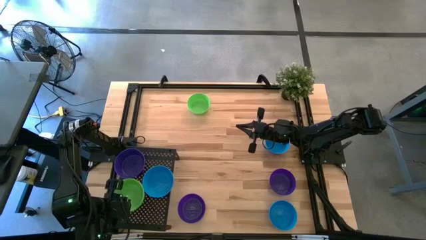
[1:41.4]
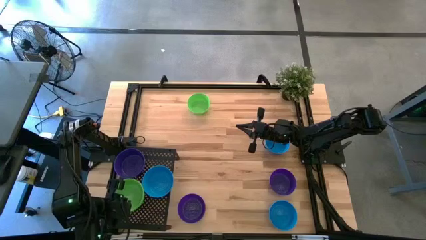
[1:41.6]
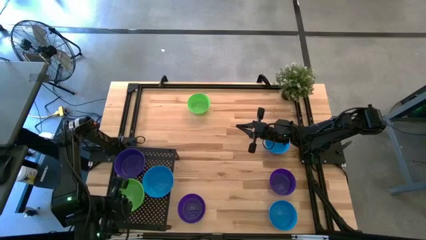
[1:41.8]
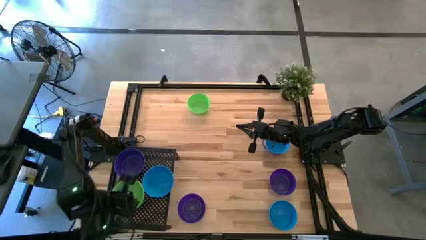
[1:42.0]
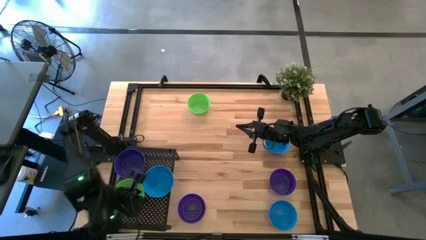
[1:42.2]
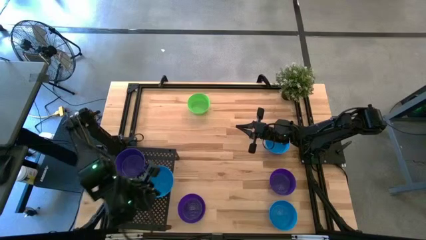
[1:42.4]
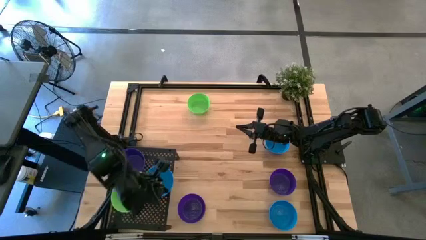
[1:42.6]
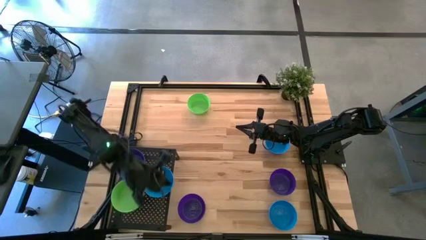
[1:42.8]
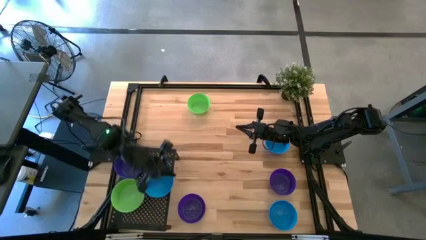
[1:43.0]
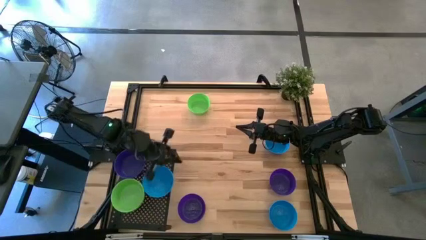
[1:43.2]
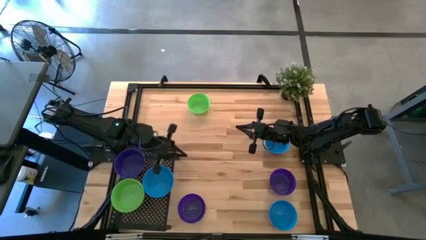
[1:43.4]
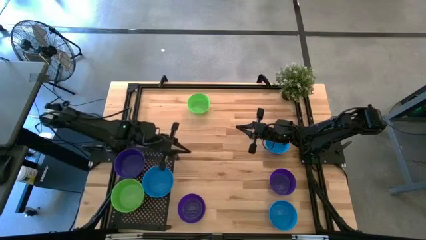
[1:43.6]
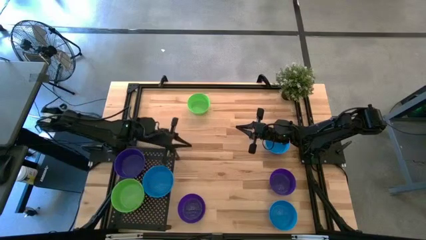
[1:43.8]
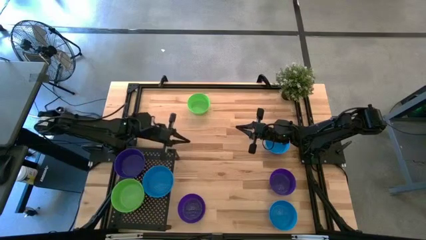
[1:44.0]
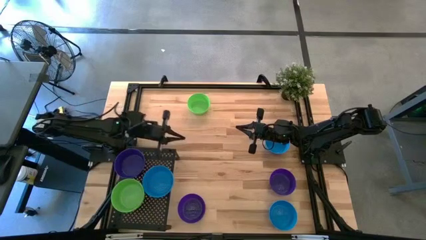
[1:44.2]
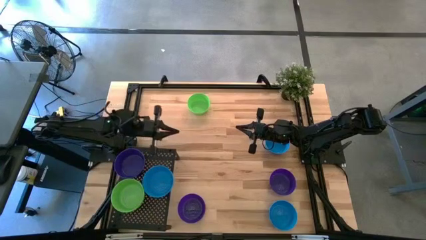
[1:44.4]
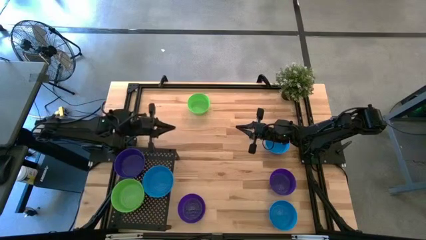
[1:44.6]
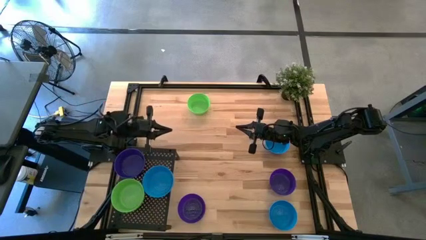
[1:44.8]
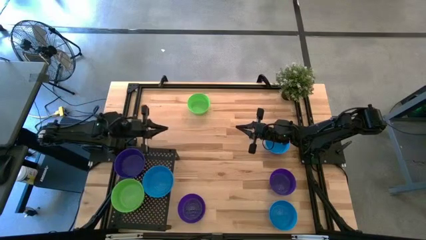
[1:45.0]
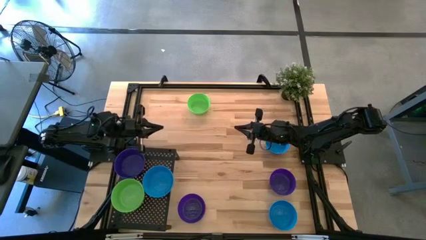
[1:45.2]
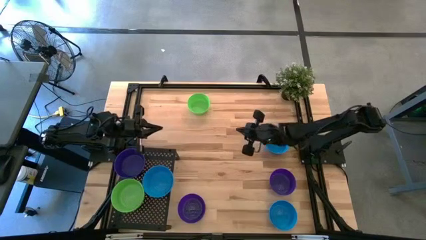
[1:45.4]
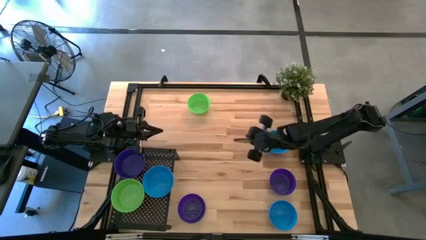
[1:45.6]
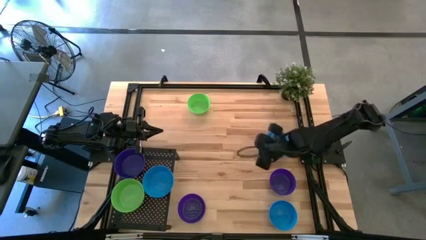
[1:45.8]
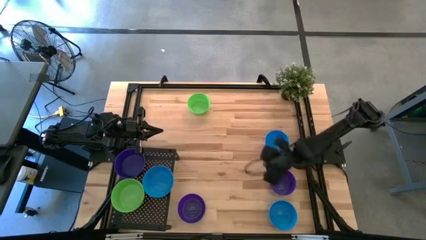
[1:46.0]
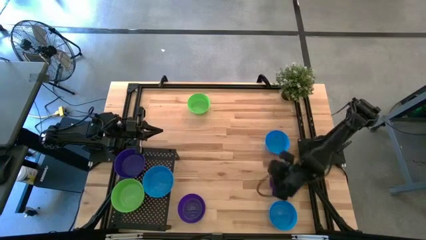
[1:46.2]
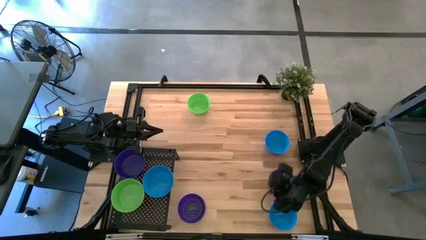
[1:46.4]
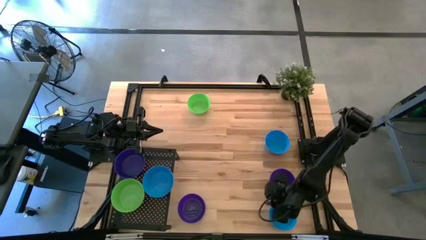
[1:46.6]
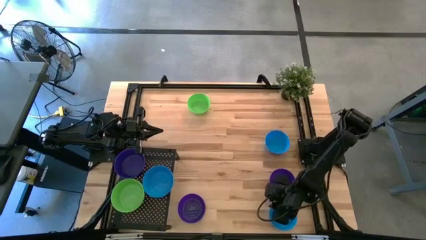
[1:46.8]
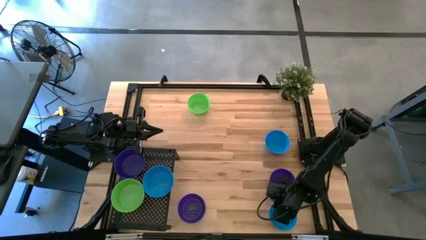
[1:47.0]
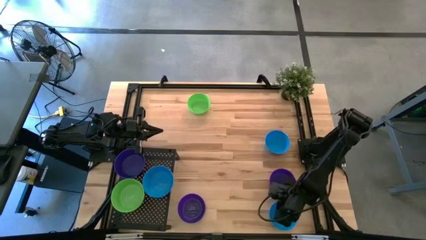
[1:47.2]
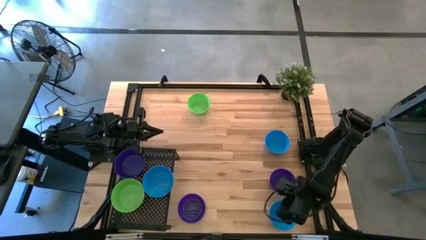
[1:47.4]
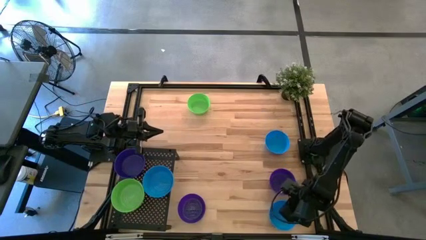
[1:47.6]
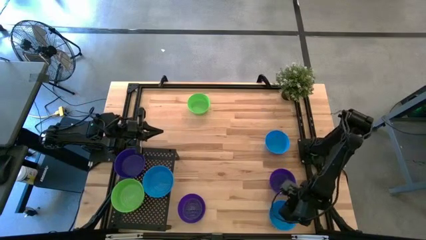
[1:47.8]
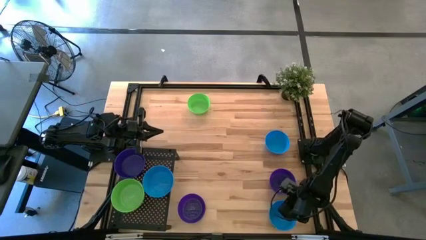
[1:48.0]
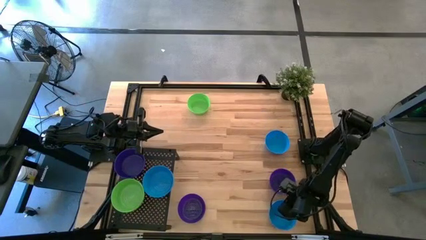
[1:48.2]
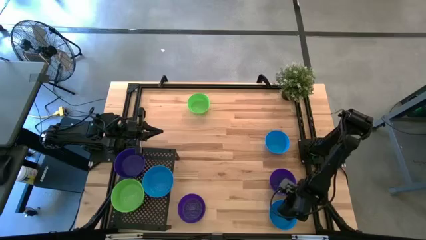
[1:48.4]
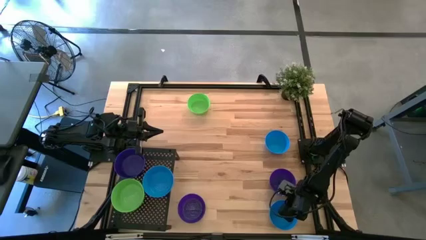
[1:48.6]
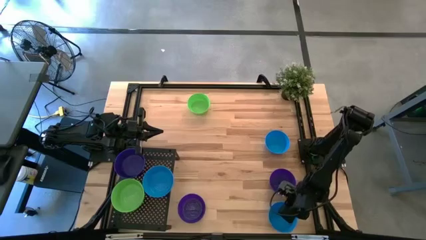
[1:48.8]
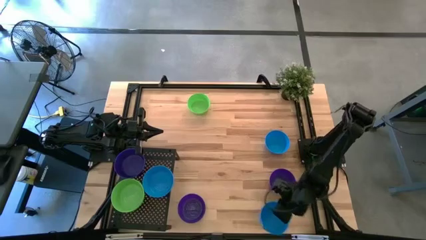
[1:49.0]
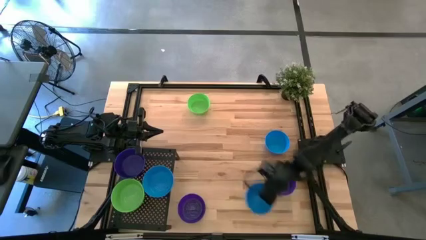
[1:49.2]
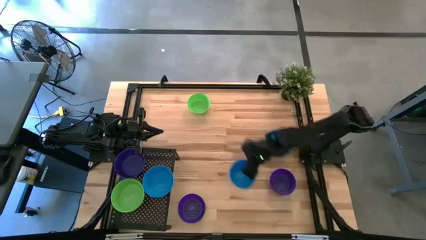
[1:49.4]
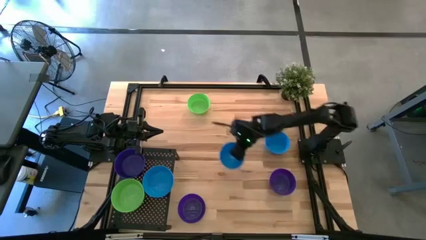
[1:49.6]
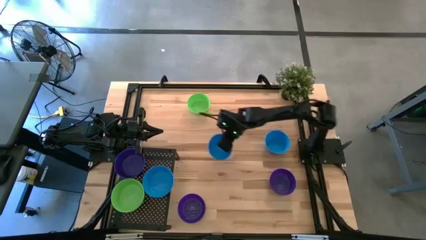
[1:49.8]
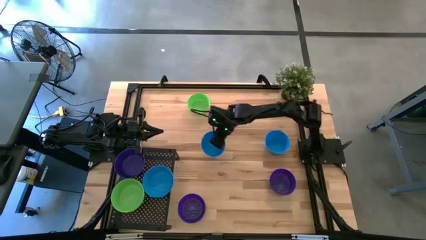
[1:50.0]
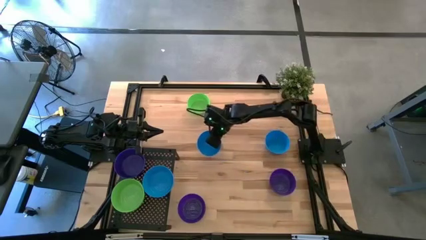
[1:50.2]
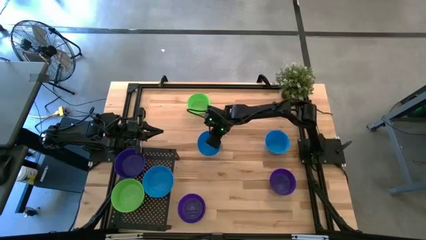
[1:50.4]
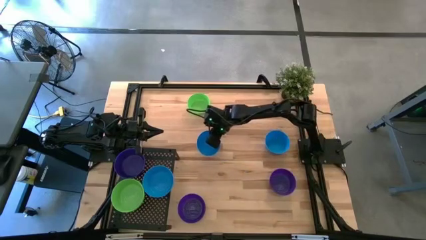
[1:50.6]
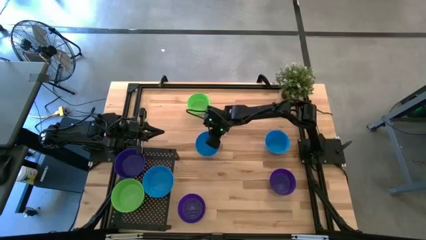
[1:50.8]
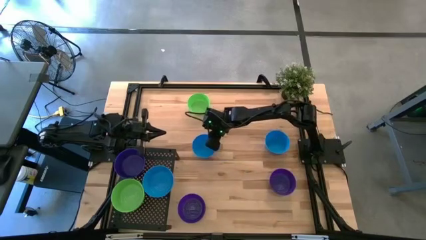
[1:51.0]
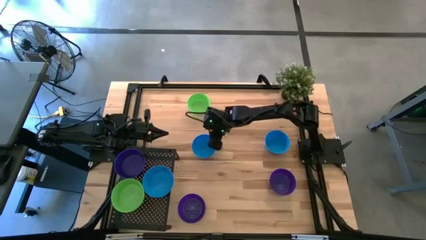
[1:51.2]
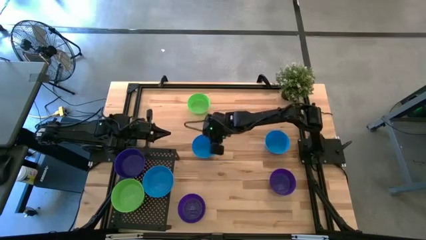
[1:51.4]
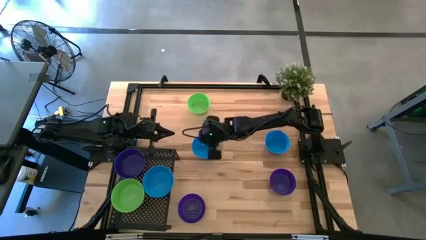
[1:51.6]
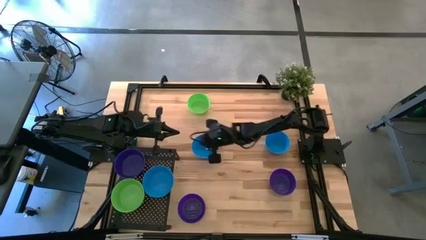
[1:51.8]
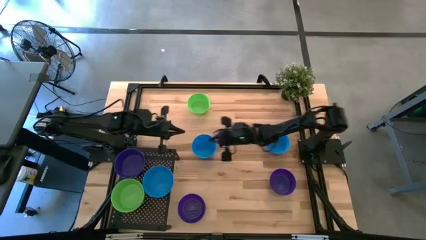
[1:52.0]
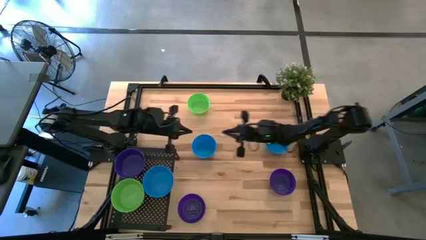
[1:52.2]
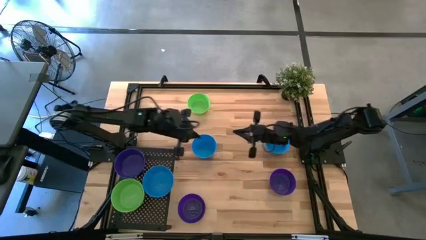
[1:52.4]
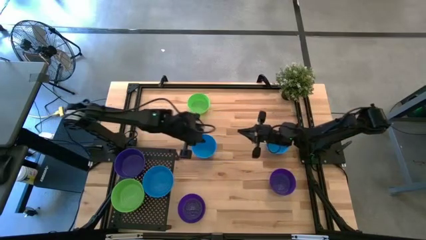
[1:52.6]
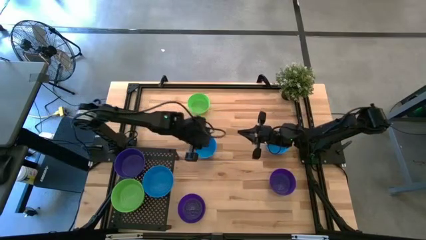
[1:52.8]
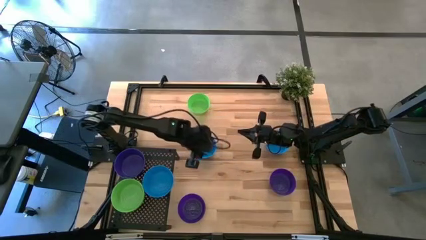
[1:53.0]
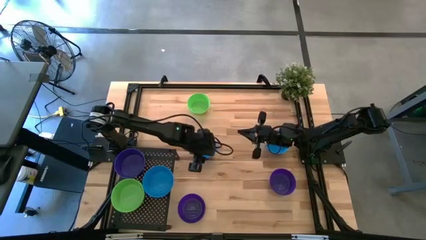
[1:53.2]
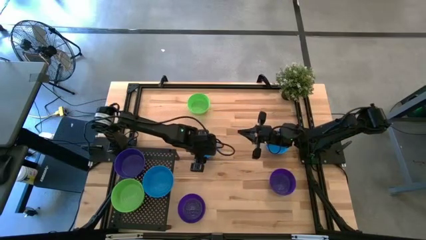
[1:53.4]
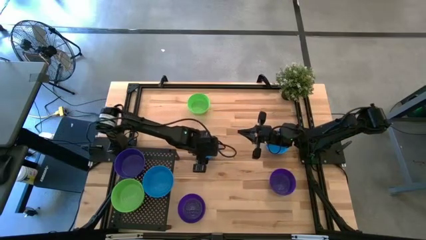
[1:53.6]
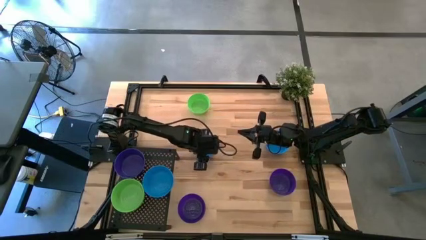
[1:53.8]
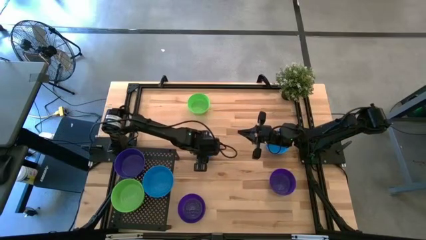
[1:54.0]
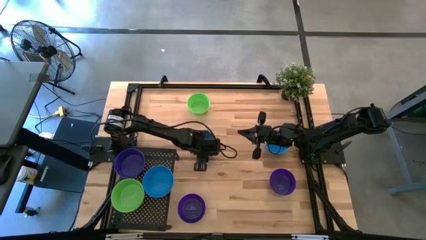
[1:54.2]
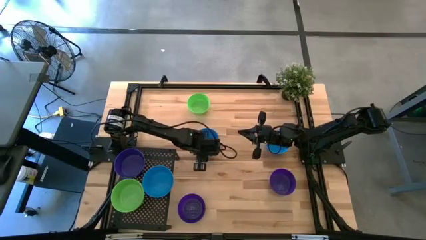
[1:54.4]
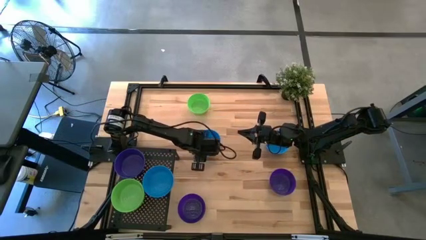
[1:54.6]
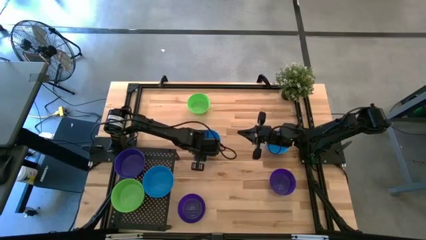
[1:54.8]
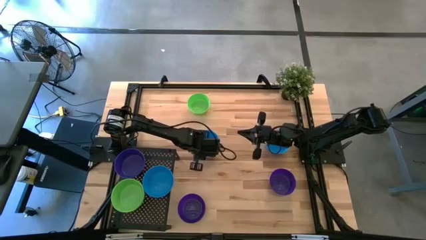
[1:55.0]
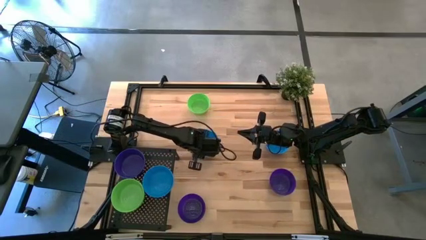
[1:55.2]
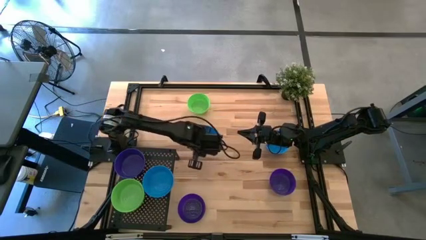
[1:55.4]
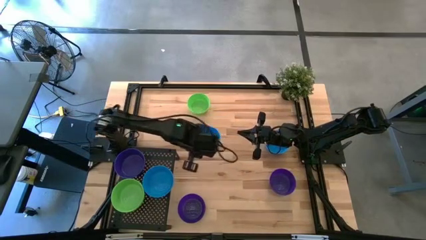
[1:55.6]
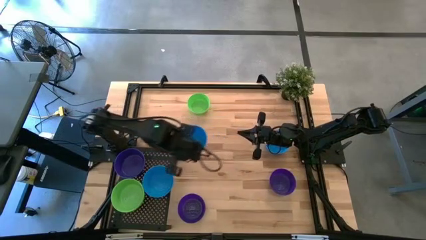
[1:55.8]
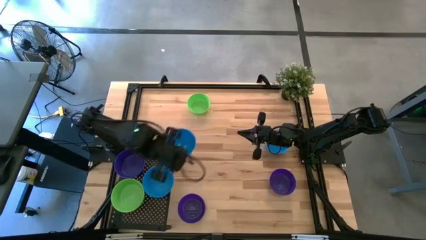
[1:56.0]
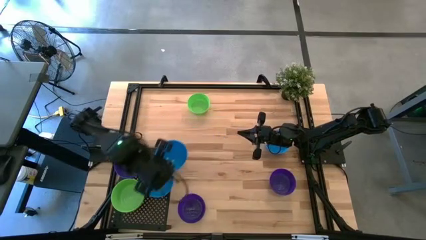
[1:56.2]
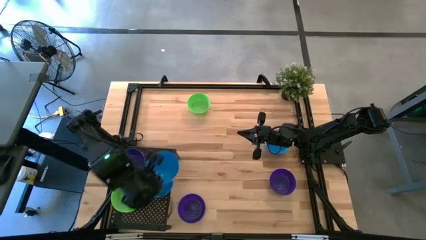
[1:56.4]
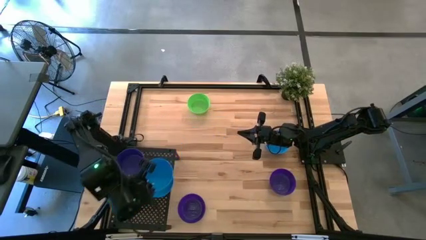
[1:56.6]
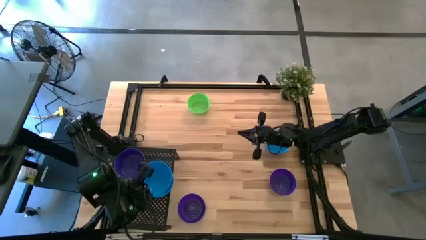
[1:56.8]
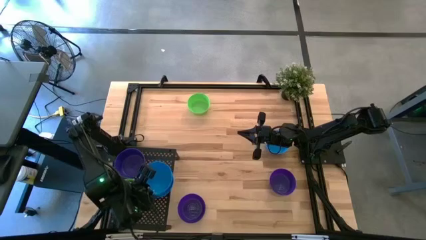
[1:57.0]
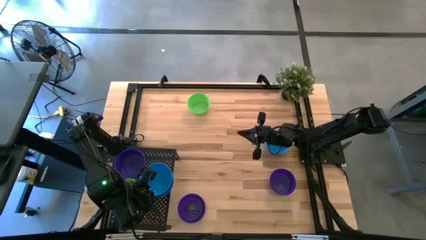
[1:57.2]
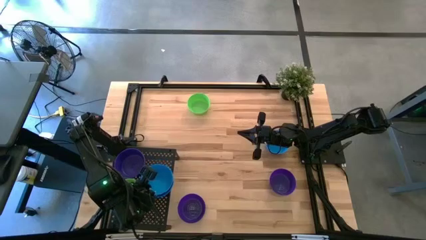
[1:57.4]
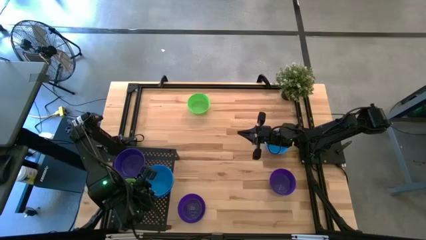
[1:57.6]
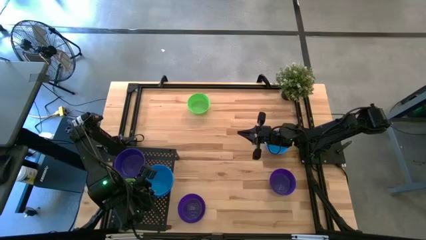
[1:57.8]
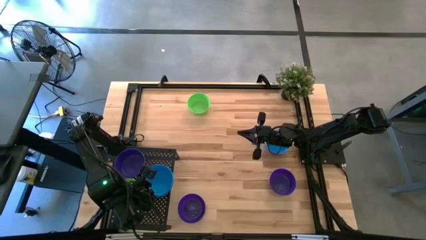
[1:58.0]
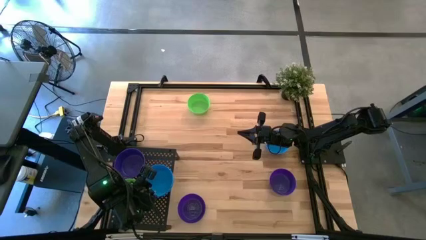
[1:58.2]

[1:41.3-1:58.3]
Task: Pick & Place Mini bowls
Stack the blue bowl on the other blue bowls on the shelf
